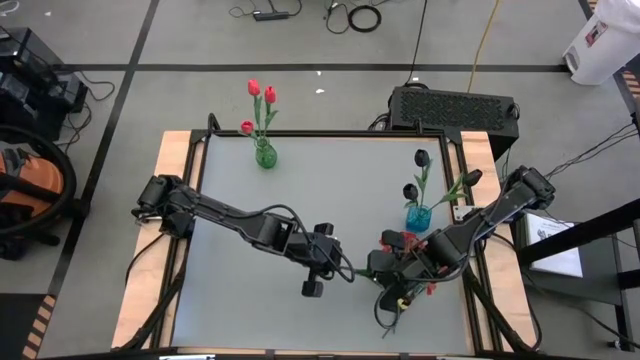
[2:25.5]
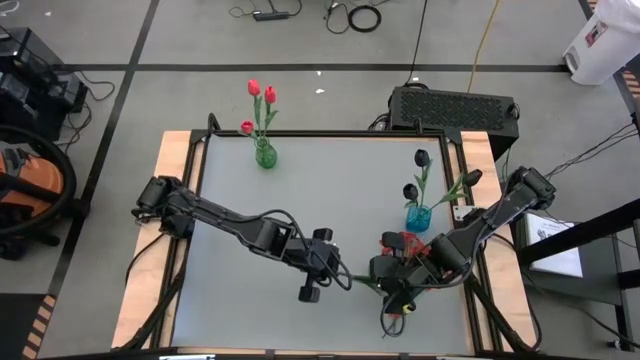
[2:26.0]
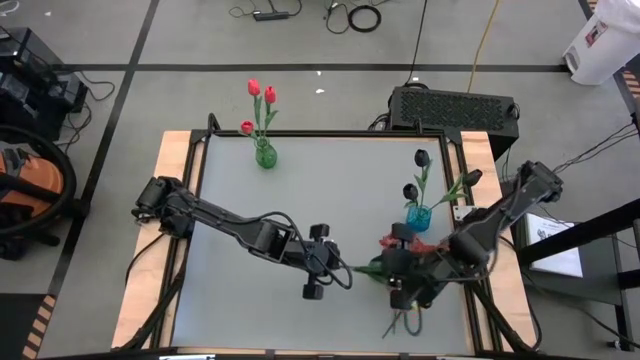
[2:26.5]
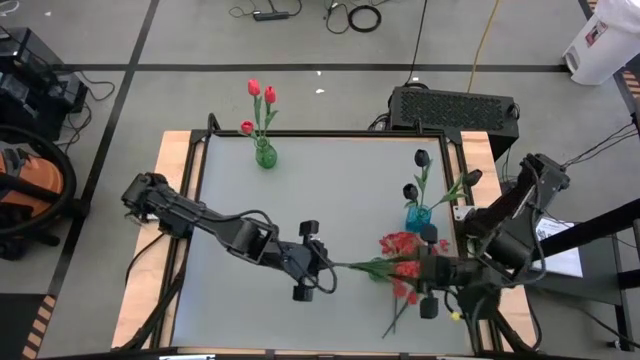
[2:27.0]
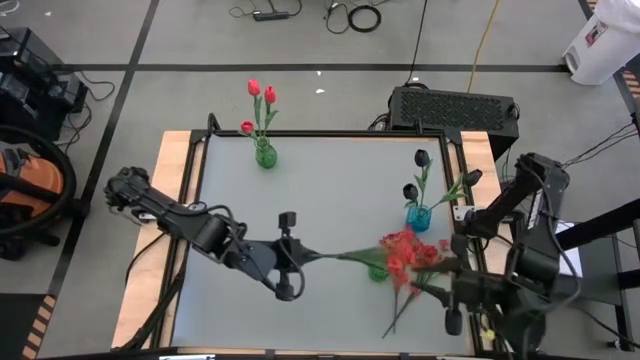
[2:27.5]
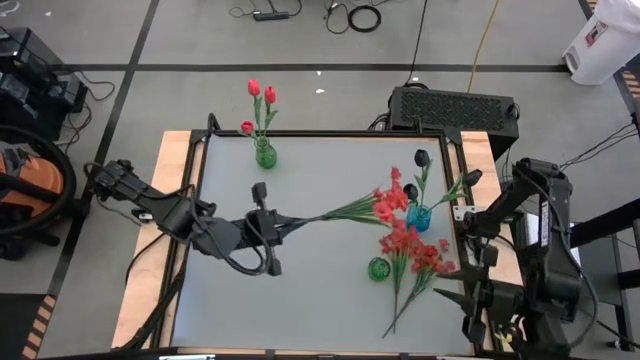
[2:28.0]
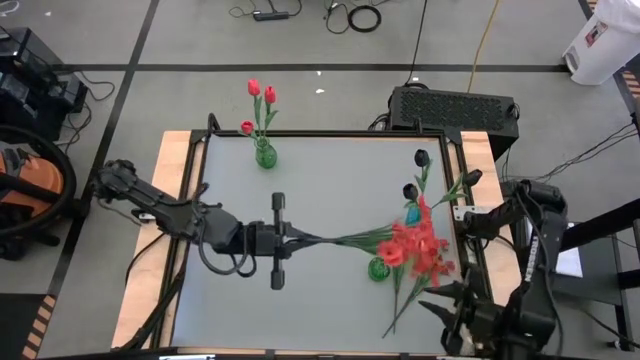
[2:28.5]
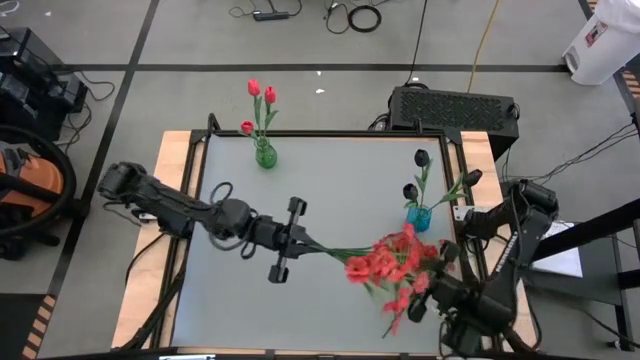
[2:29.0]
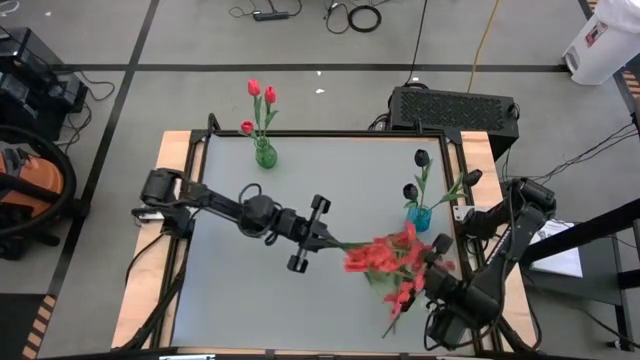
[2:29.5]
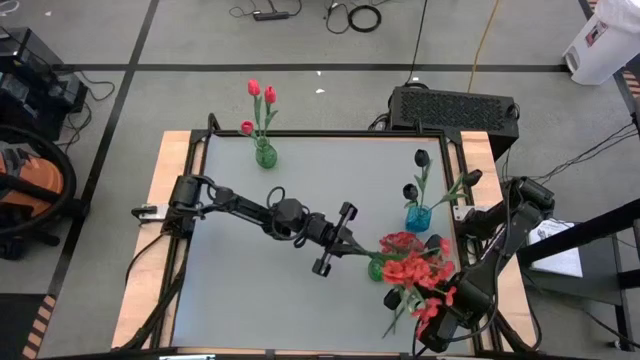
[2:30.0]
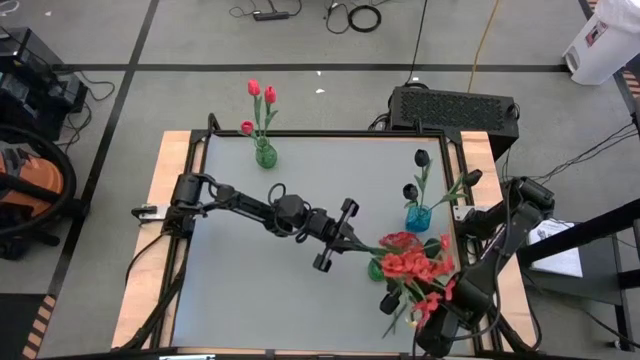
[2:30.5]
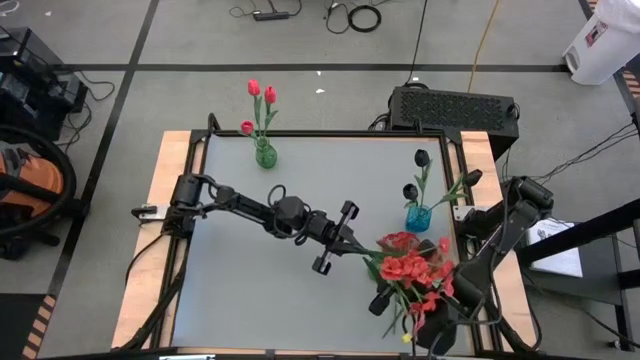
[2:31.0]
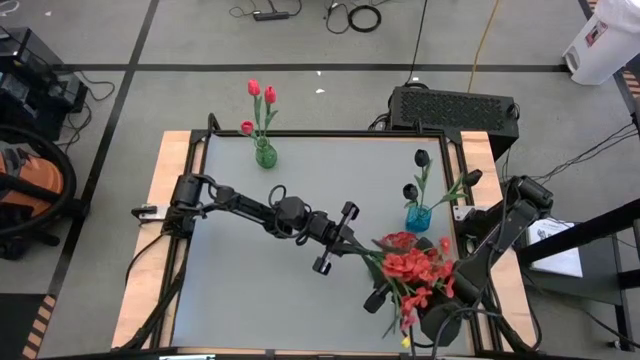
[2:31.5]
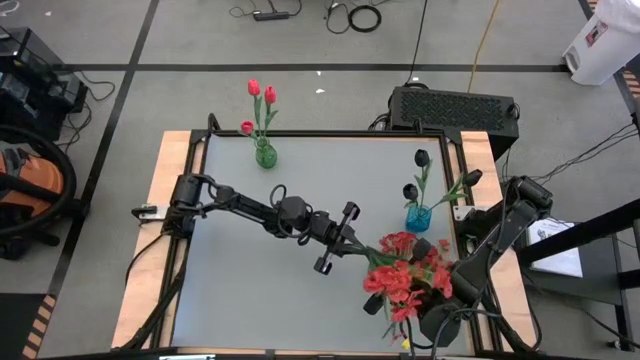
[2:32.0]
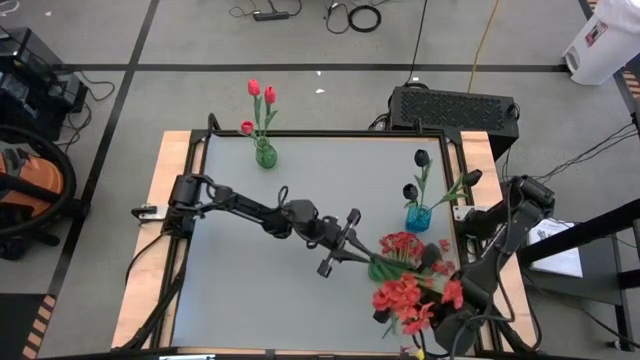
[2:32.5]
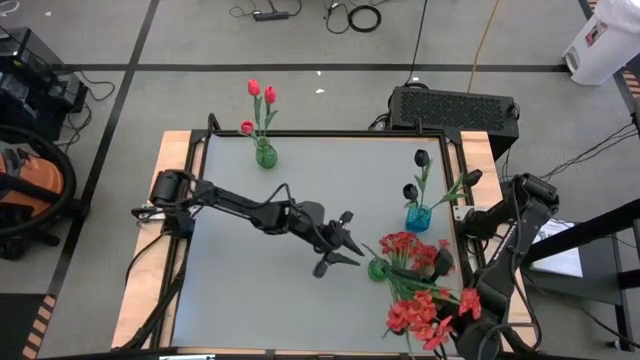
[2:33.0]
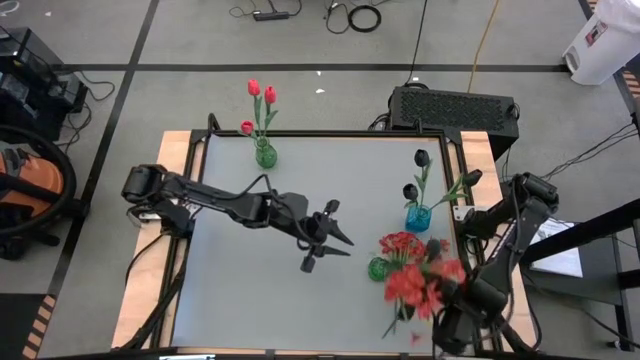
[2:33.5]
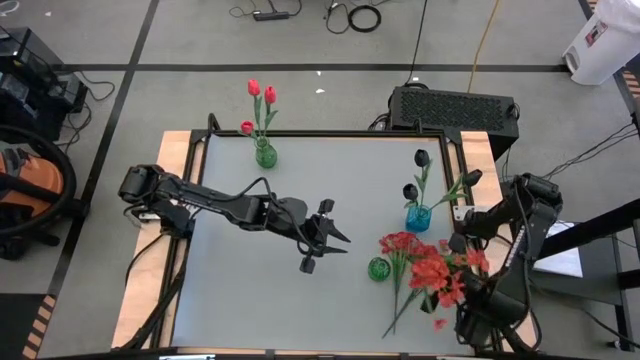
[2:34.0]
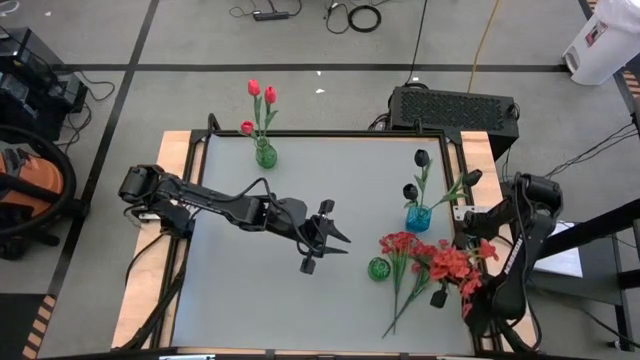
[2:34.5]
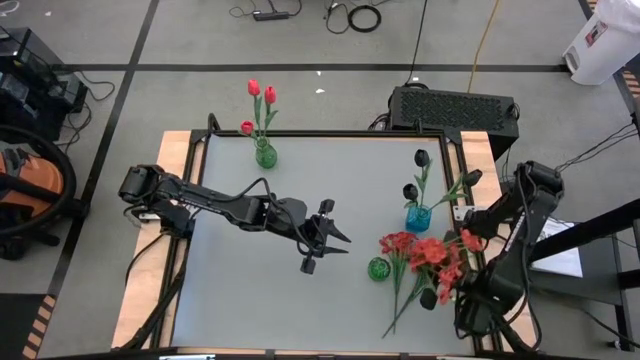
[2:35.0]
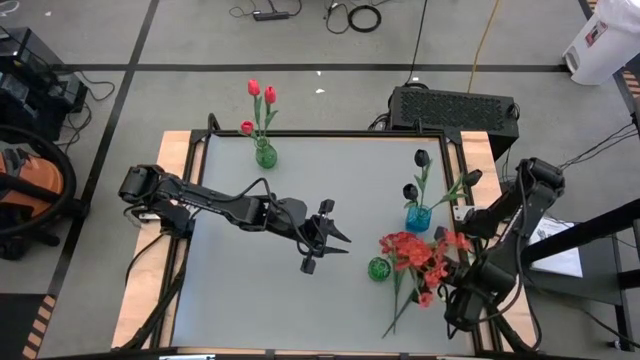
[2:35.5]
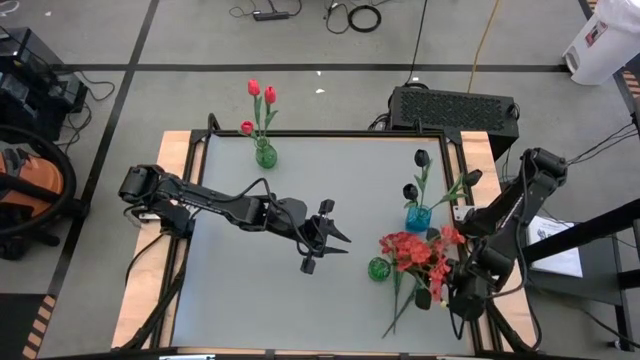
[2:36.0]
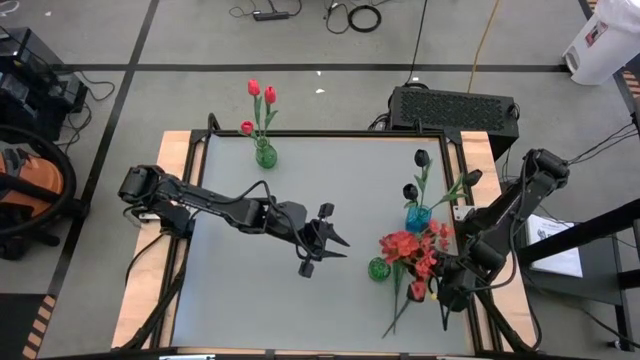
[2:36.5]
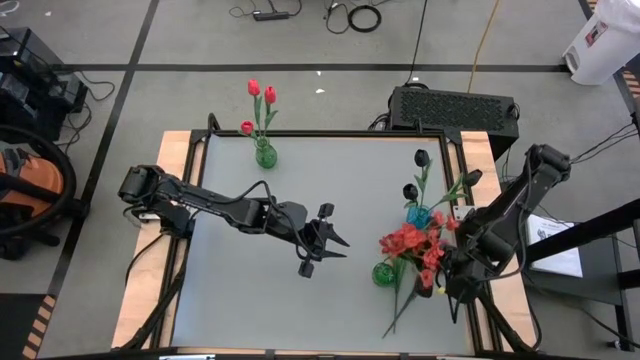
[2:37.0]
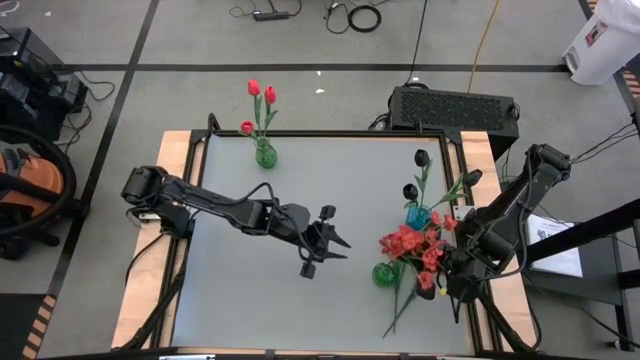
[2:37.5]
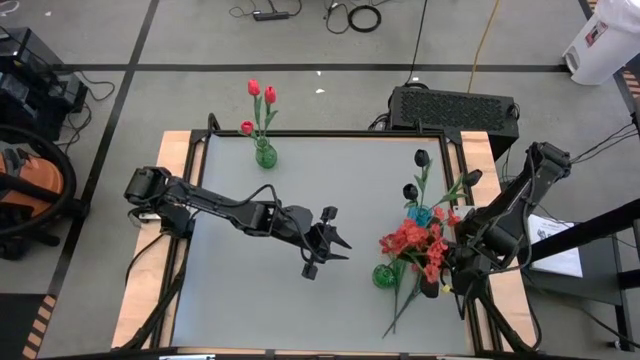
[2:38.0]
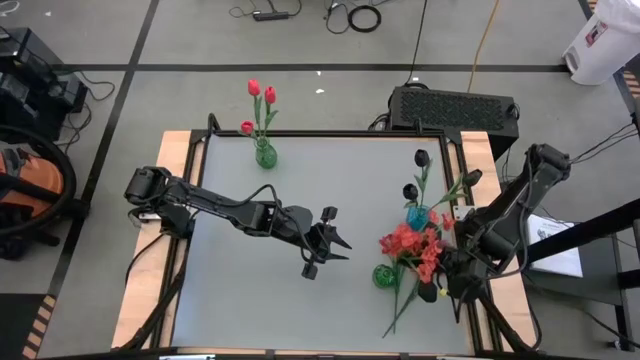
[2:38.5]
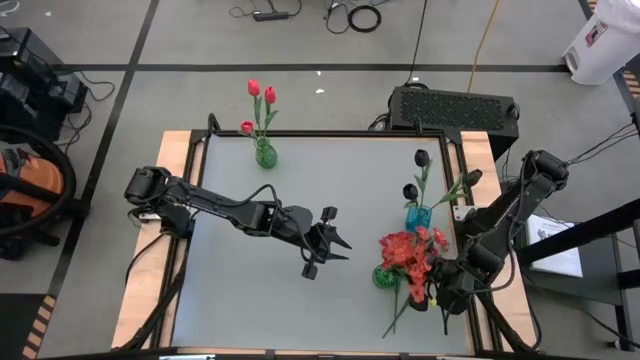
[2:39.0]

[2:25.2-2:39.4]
Task: Sort flowers into vase by color
Put the right red flowers into the bottom green vase

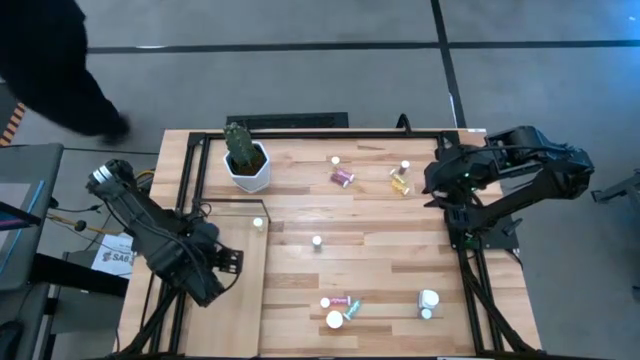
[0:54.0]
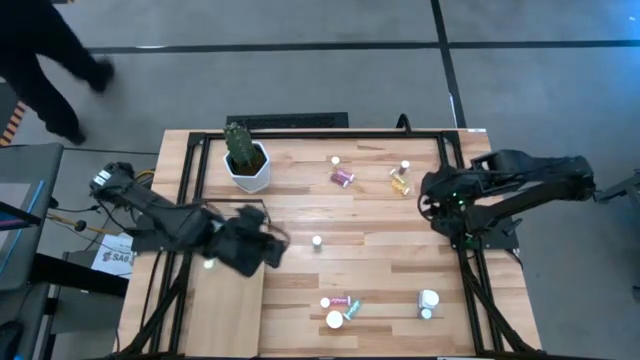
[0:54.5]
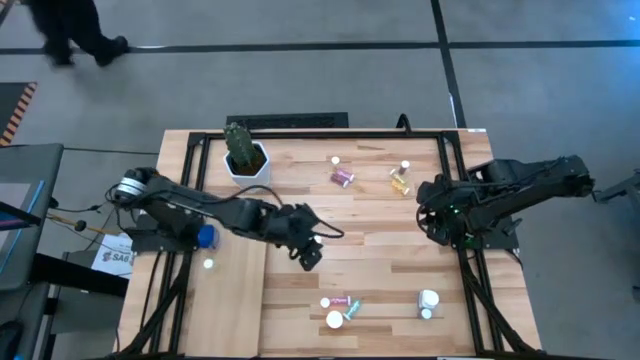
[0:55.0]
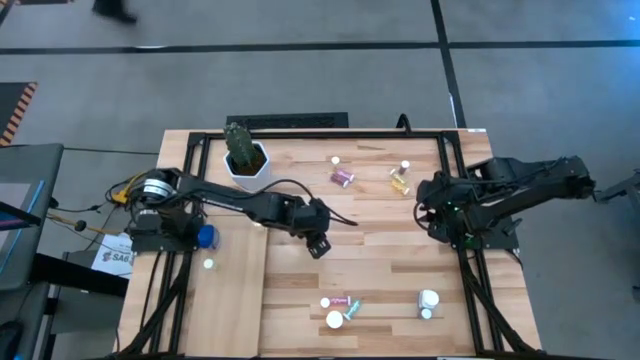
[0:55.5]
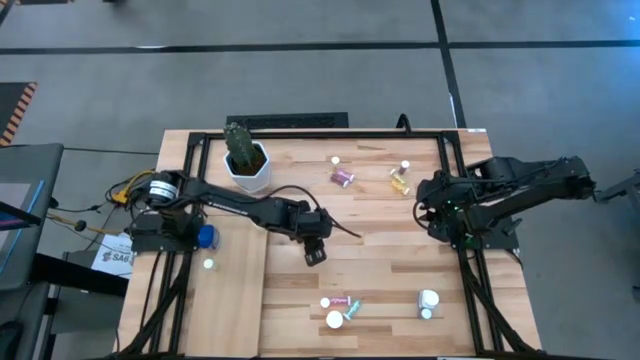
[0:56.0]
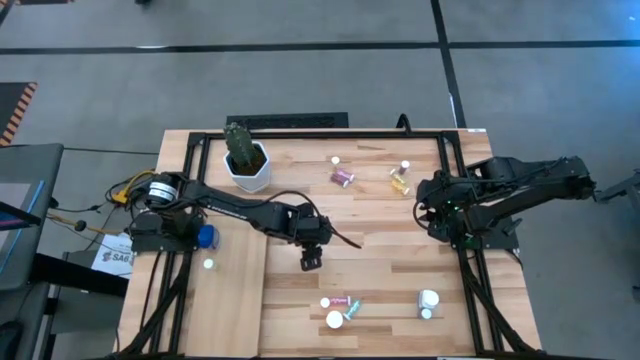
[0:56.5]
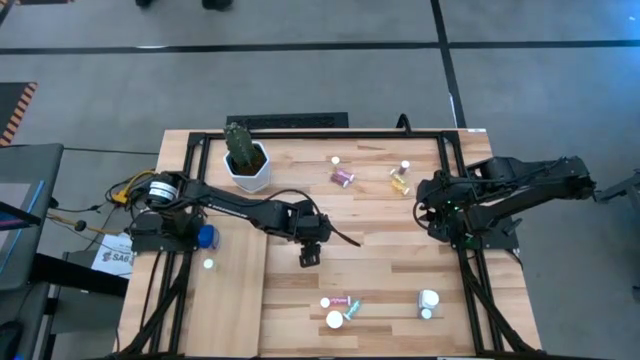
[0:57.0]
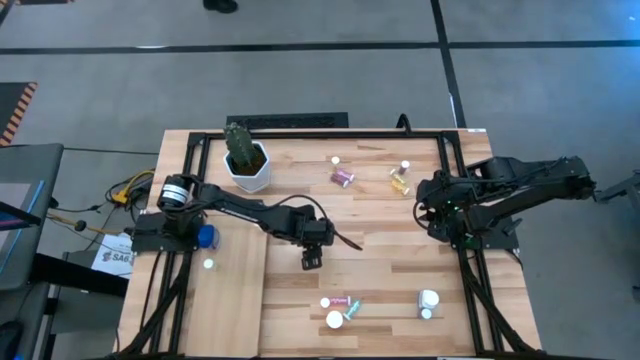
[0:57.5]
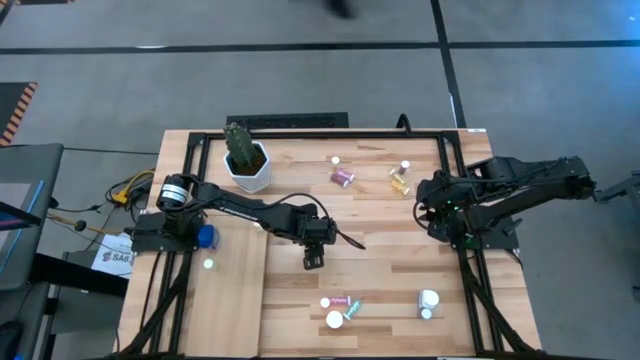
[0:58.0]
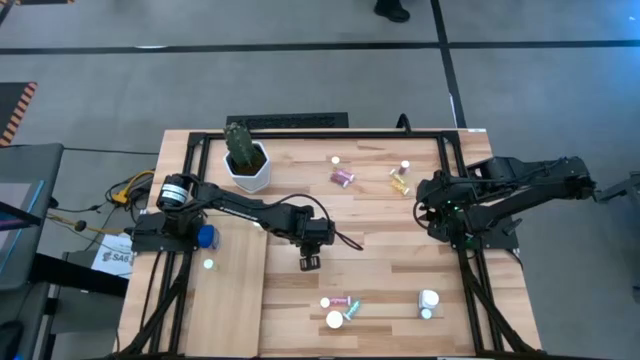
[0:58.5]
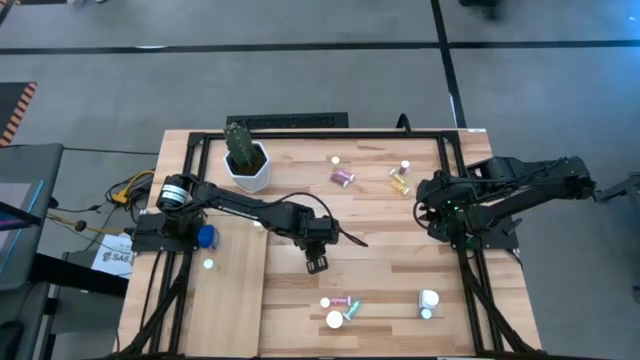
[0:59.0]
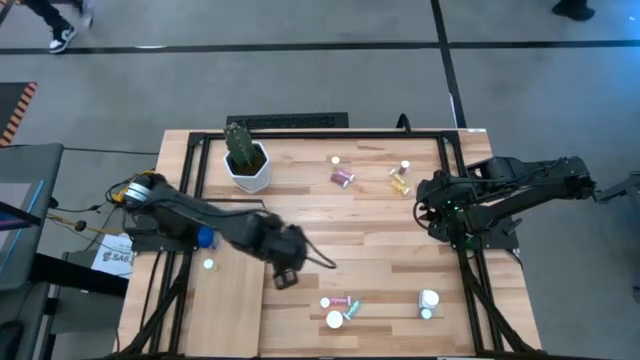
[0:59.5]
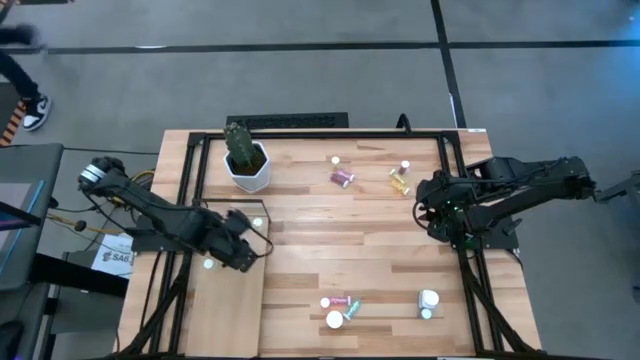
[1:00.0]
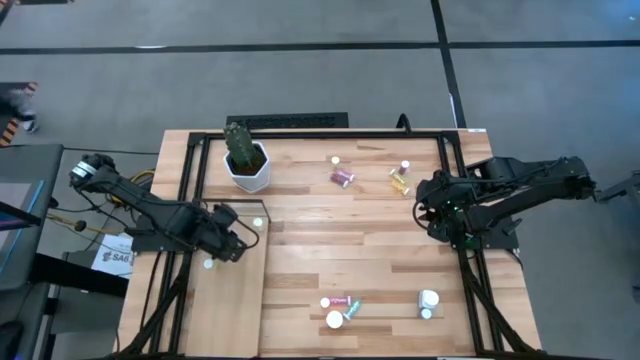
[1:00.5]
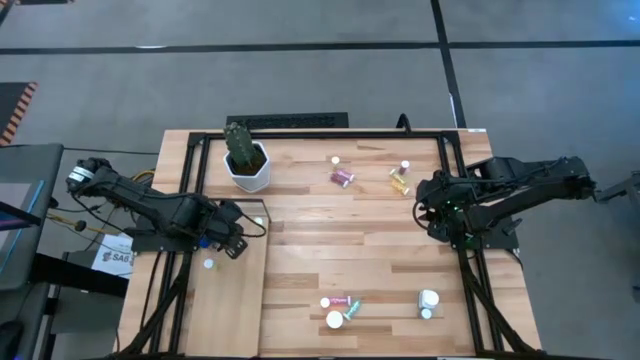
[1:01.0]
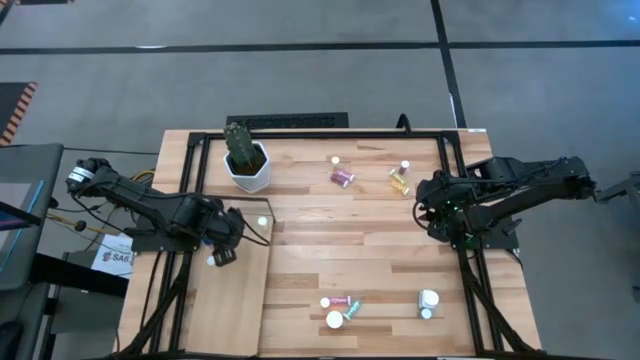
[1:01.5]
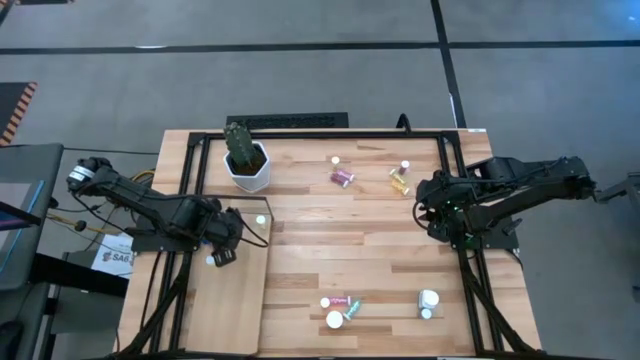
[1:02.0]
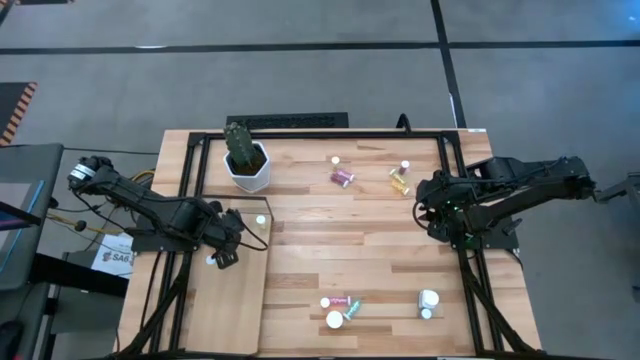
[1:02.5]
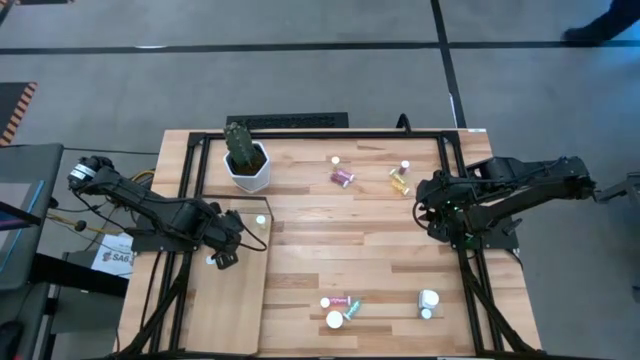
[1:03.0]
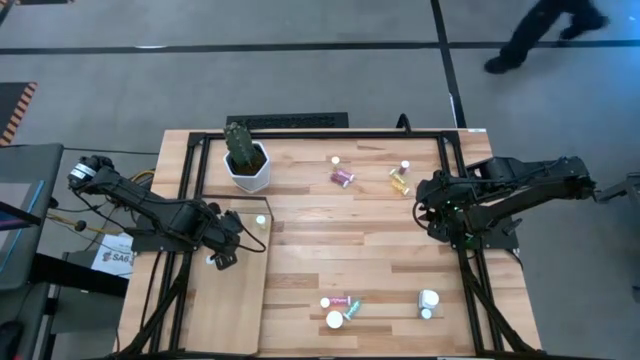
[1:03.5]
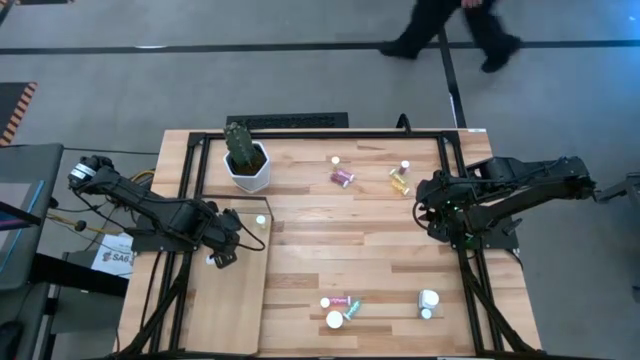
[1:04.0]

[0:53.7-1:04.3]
Task: Pick and place medicine bottles onto shelf by color
Put the light blue pill bottle on the shelf
